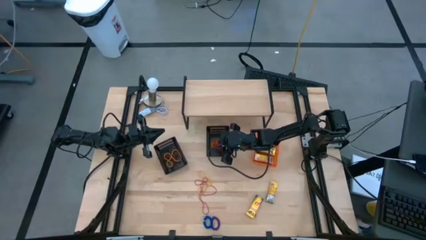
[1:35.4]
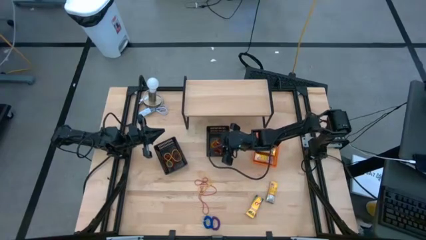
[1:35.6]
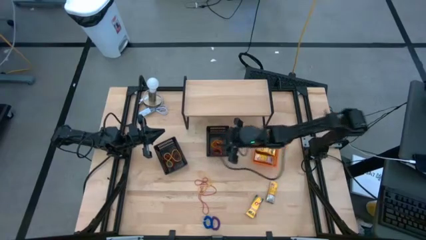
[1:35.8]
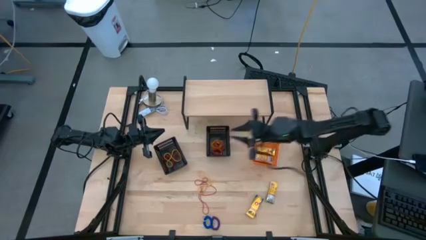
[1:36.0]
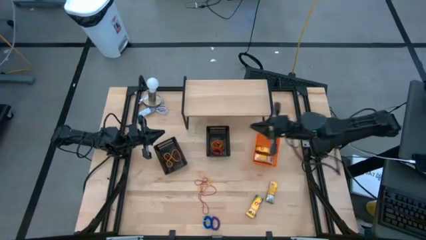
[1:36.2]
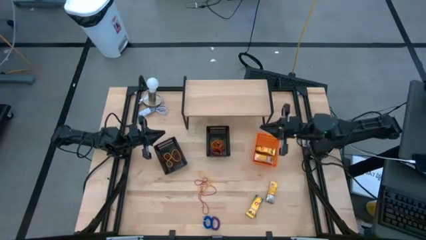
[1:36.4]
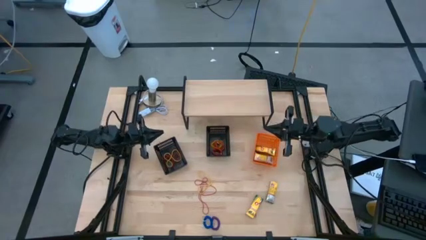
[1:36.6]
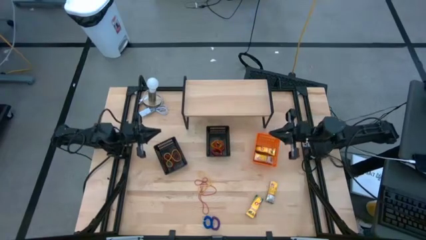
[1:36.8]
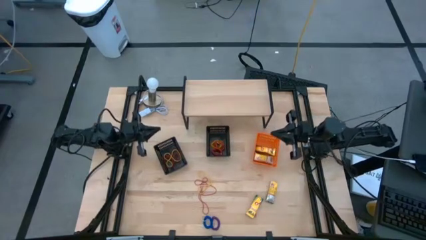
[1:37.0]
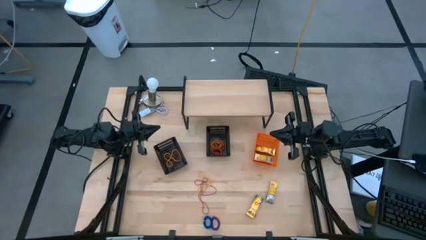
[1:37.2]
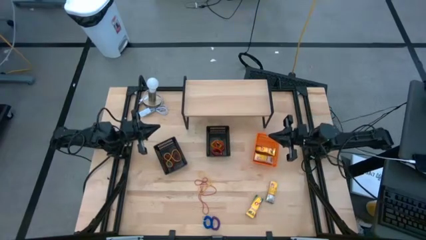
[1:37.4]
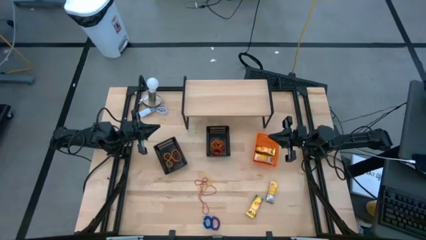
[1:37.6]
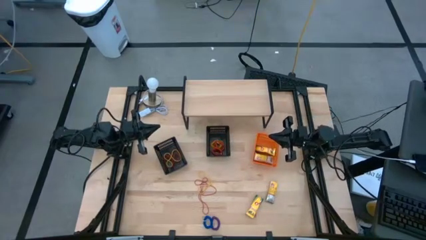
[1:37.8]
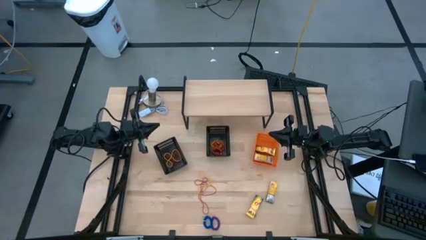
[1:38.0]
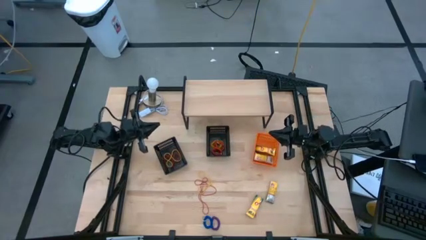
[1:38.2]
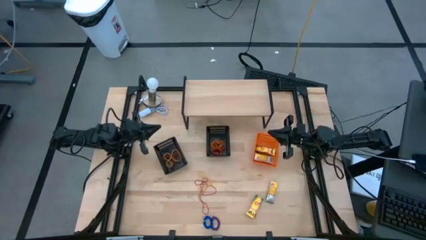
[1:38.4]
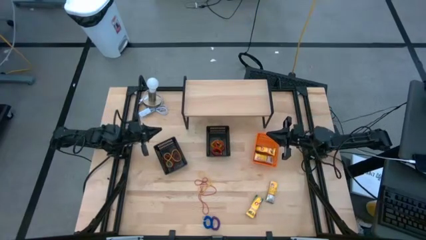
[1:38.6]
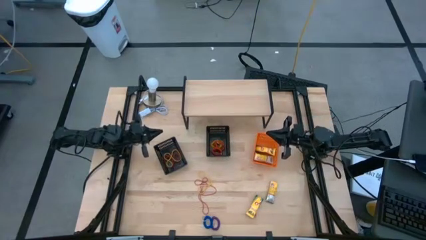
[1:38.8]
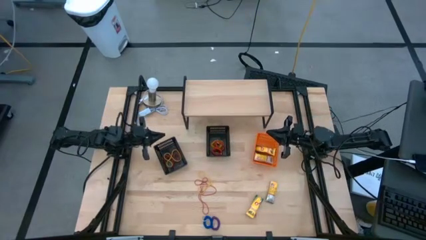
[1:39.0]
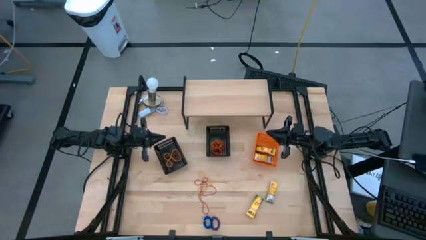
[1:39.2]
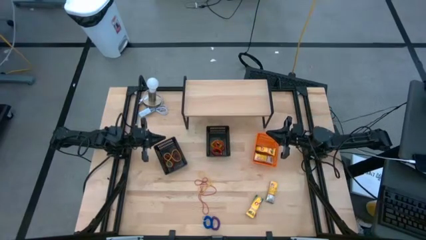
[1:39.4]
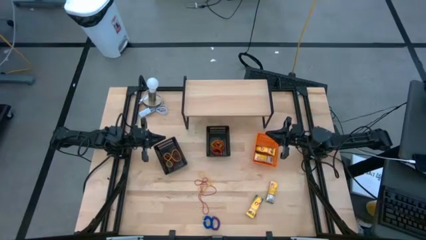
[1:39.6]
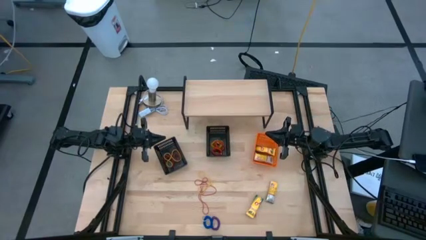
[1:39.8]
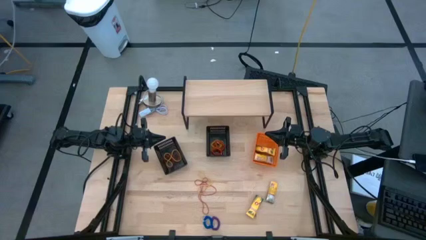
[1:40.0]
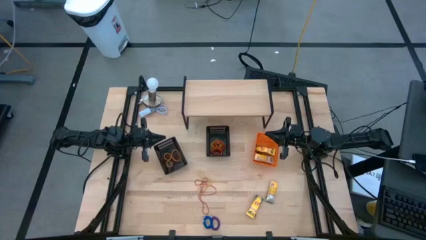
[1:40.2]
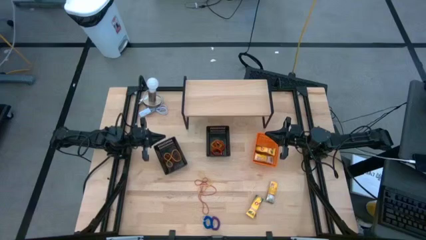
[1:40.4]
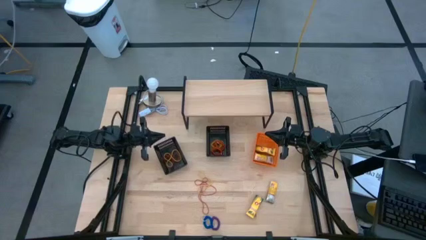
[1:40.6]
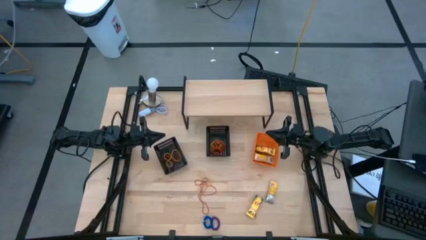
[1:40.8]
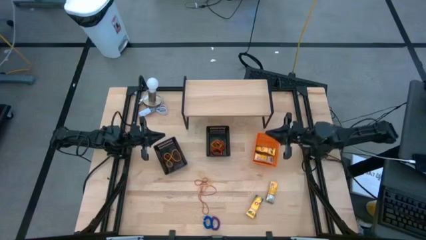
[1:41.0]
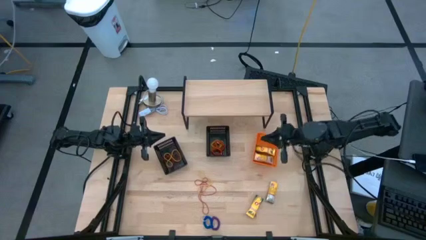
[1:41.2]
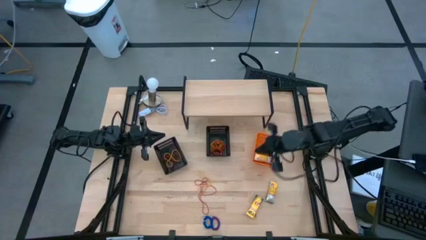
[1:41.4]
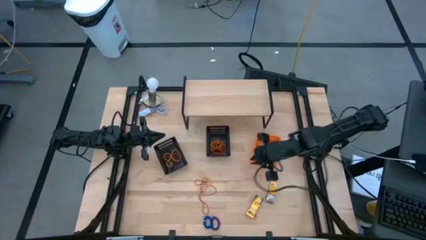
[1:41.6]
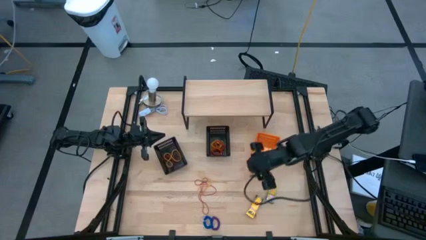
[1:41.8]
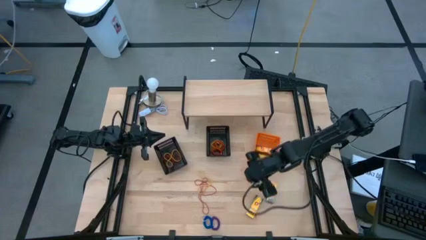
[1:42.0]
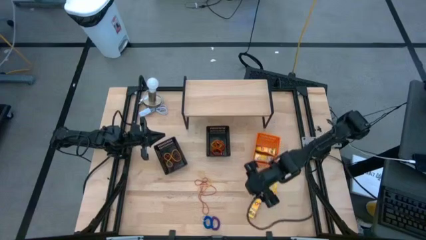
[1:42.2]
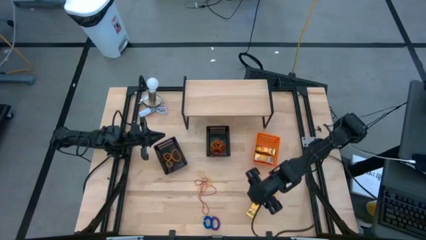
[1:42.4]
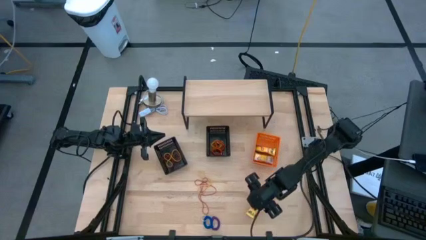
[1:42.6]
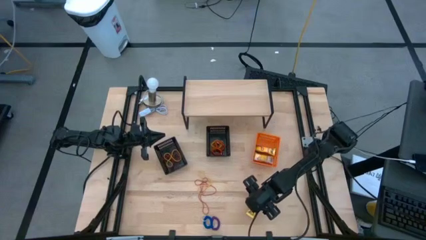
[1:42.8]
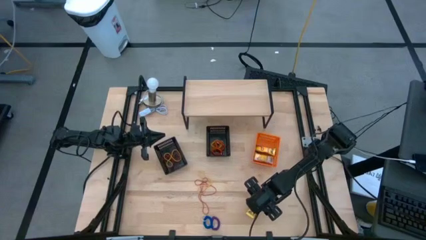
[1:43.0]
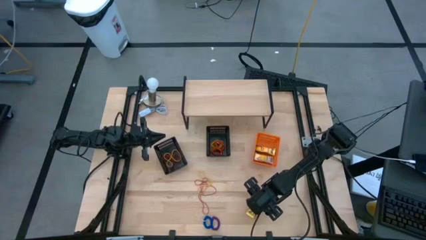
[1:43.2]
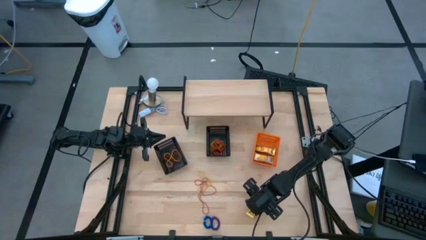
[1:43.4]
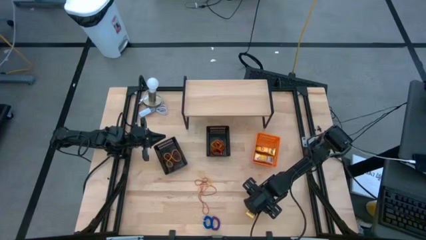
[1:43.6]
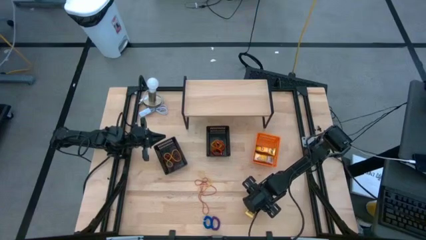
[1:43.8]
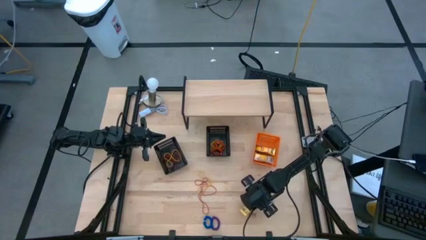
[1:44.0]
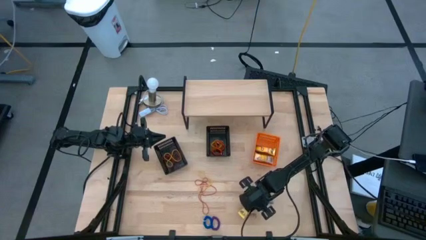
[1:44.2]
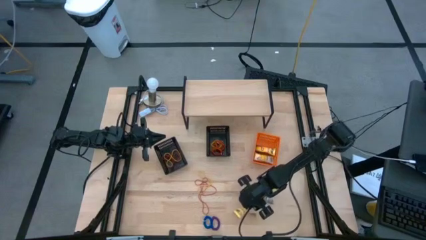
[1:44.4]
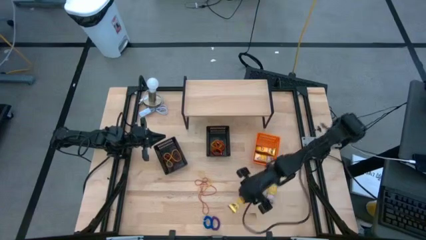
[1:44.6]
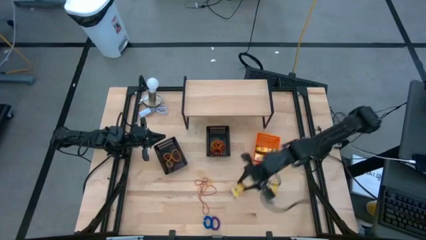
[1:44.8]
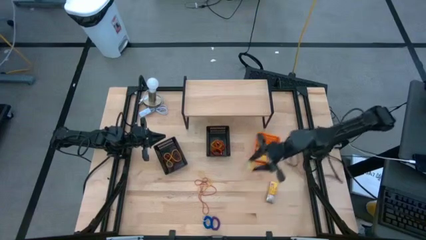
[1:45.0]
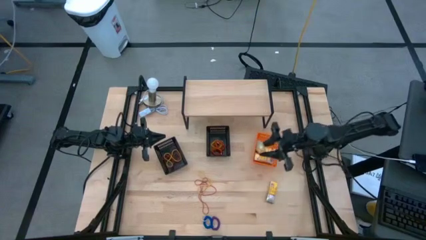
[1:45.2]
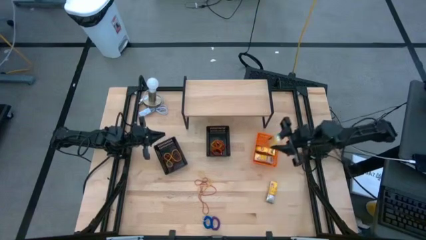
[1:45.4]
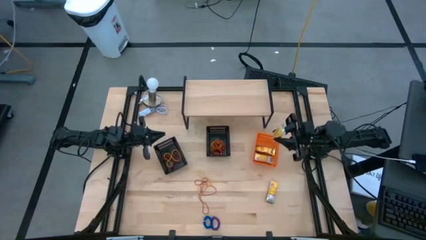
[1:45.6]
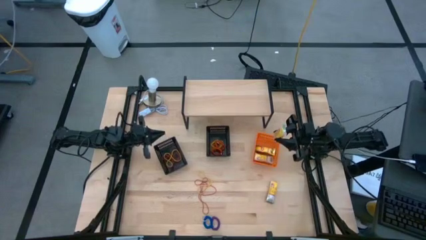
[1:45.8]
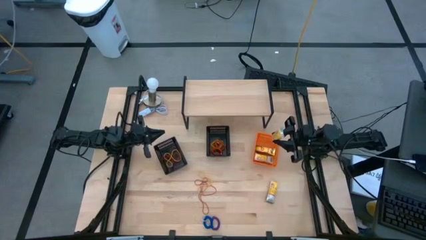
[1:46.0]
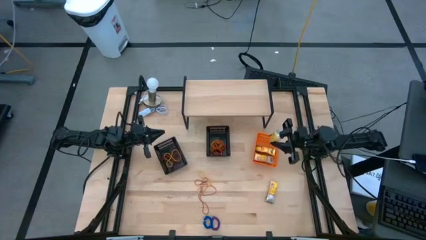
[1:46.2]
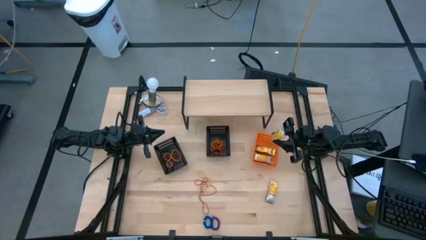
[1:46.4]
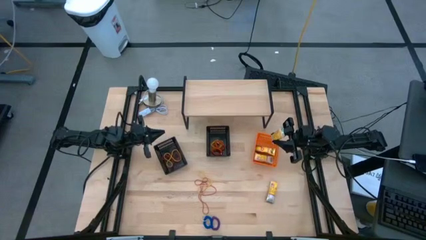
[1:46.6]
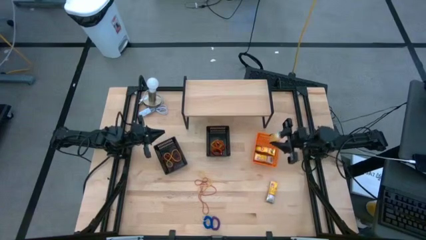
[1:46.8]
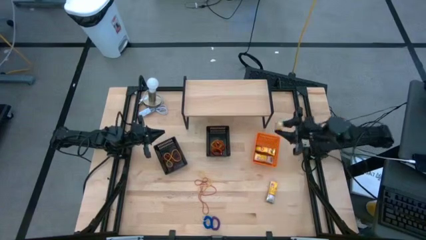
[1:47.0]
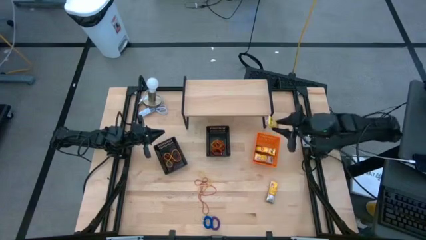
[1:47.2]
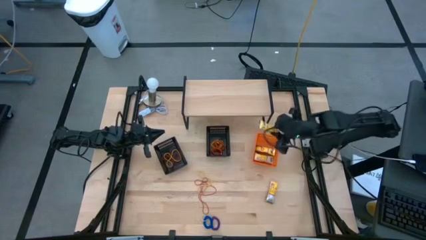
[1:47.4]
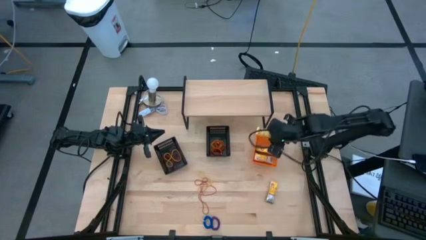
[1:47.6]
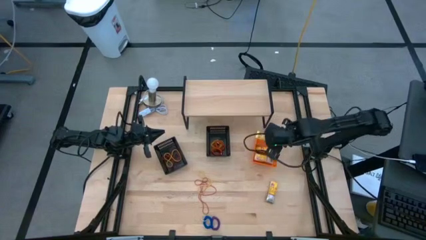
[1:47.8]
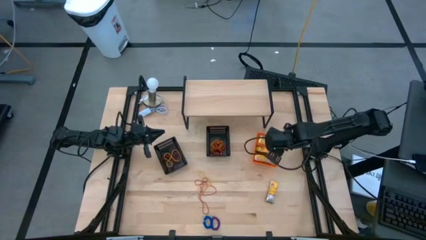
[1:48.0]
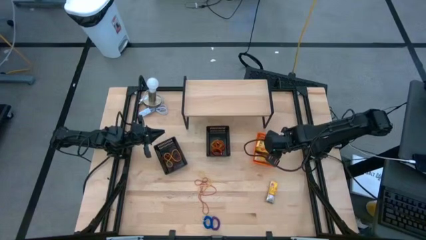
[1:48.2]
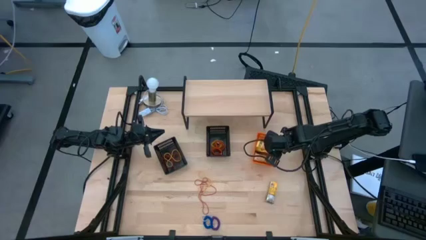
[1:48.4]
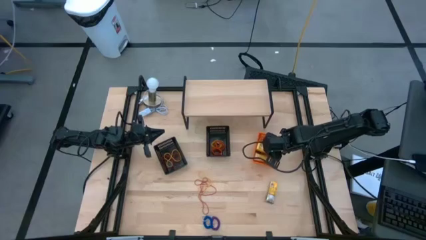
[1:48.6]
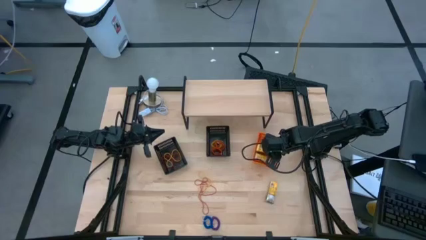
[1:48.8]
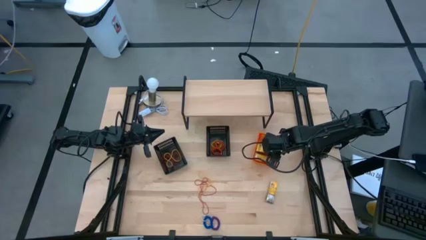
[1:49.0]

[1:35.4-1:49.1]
Task: Pick & Place Office Desk Supplies
Put the crayon box into orange basket
